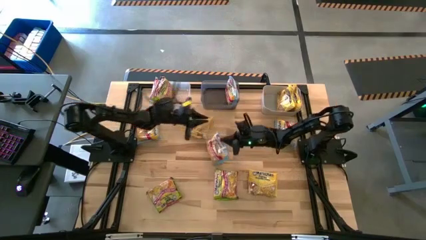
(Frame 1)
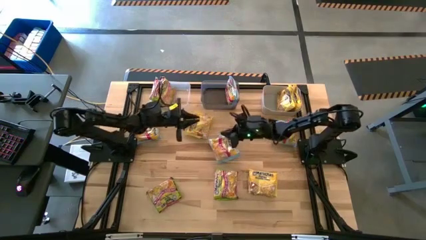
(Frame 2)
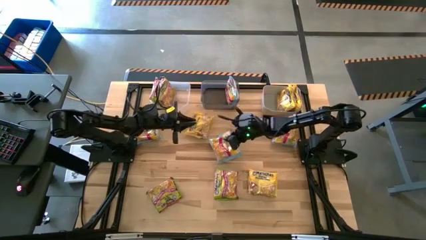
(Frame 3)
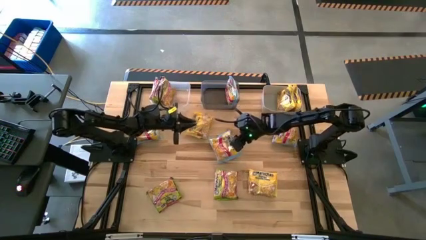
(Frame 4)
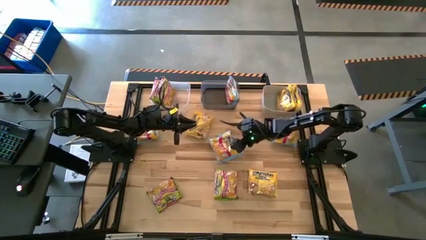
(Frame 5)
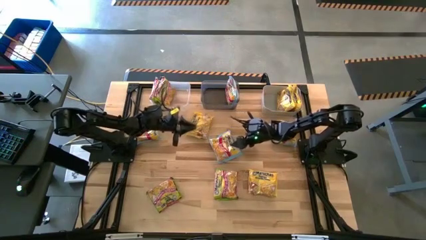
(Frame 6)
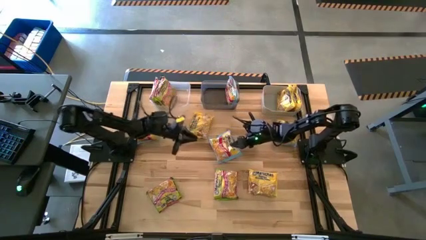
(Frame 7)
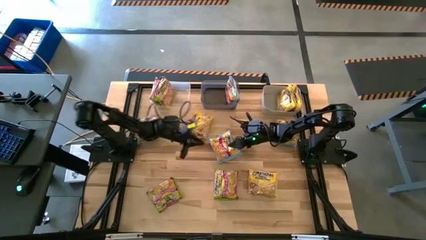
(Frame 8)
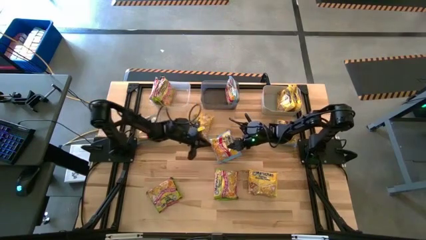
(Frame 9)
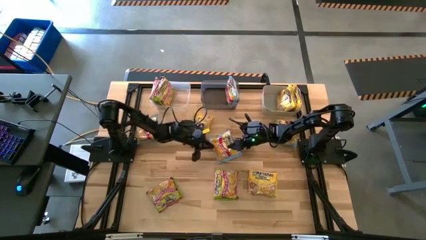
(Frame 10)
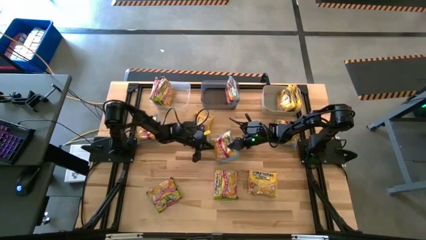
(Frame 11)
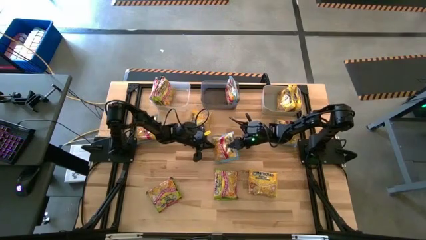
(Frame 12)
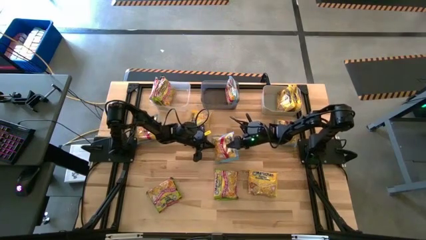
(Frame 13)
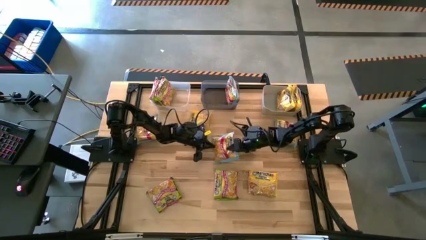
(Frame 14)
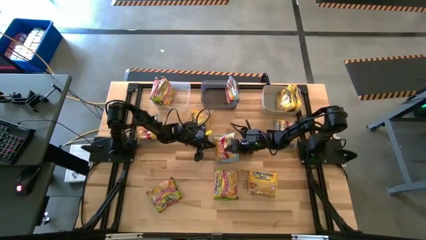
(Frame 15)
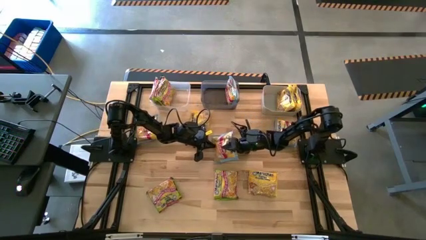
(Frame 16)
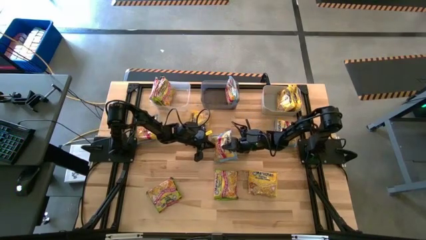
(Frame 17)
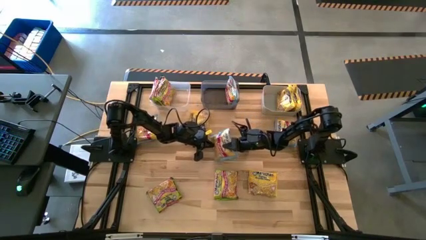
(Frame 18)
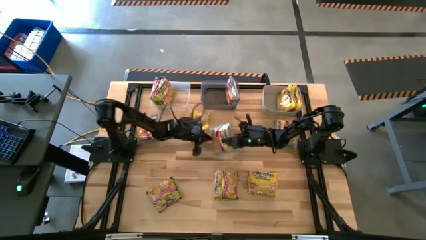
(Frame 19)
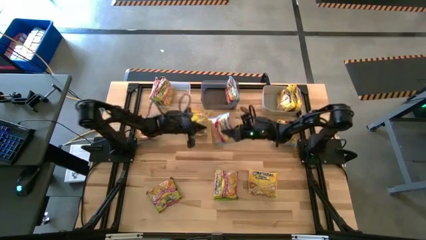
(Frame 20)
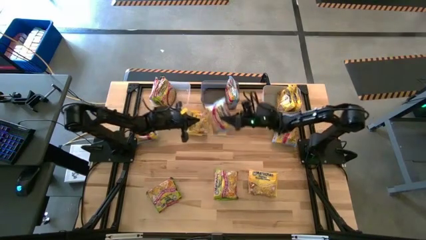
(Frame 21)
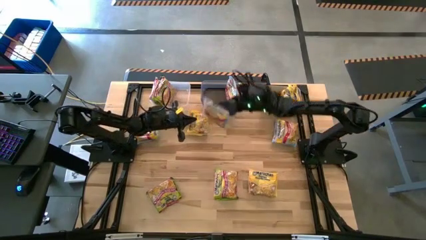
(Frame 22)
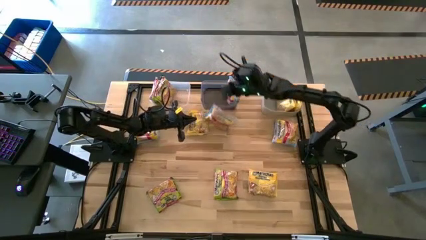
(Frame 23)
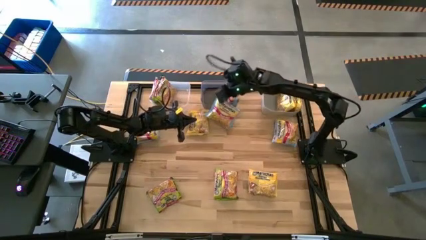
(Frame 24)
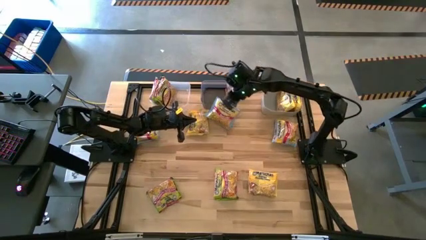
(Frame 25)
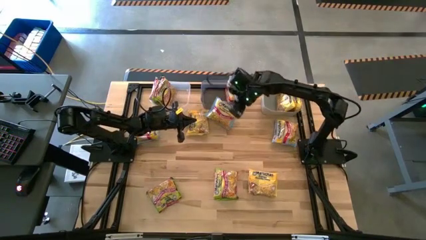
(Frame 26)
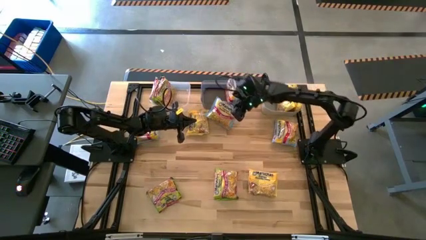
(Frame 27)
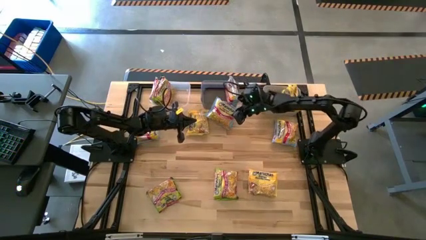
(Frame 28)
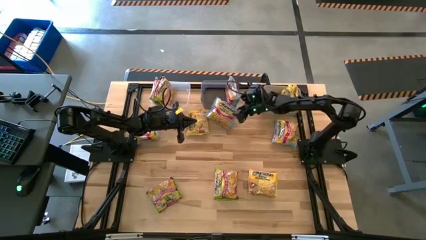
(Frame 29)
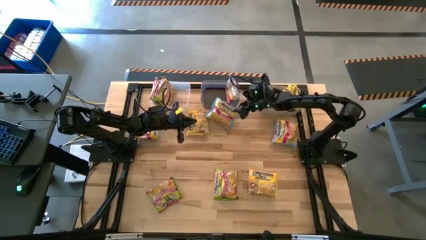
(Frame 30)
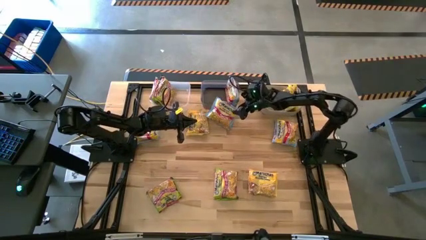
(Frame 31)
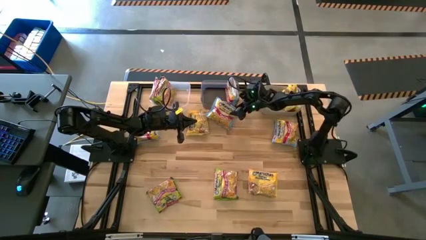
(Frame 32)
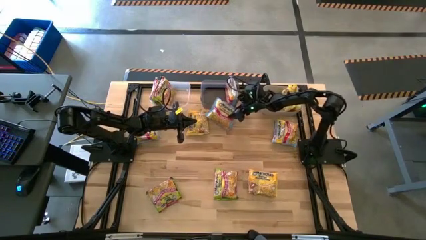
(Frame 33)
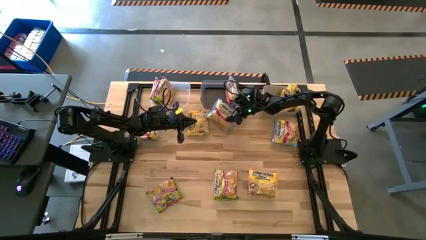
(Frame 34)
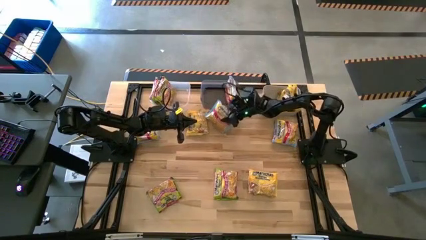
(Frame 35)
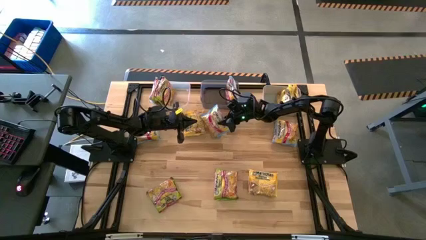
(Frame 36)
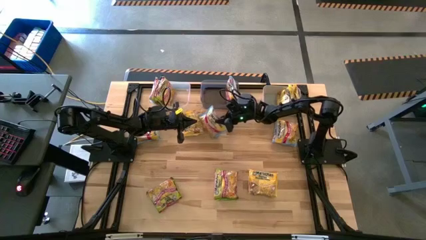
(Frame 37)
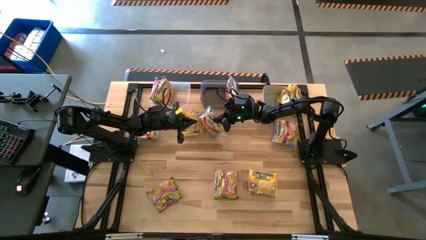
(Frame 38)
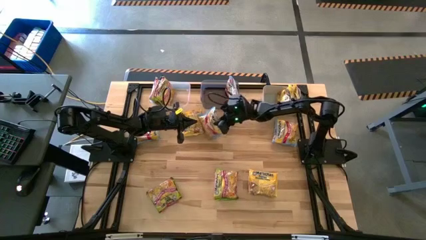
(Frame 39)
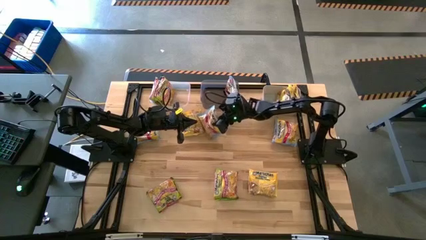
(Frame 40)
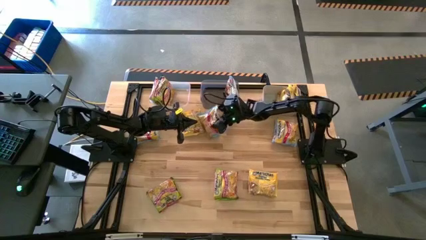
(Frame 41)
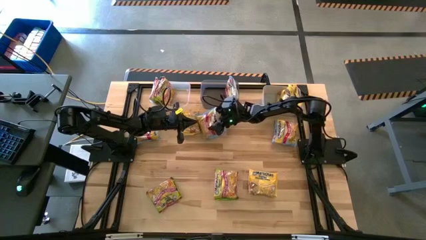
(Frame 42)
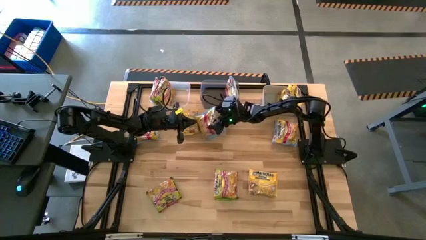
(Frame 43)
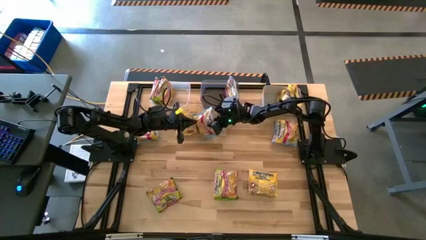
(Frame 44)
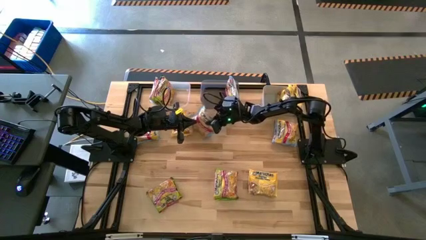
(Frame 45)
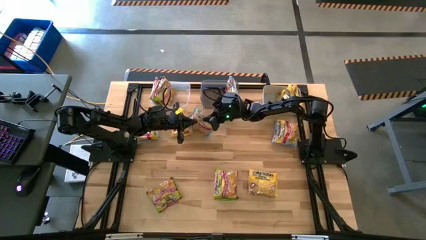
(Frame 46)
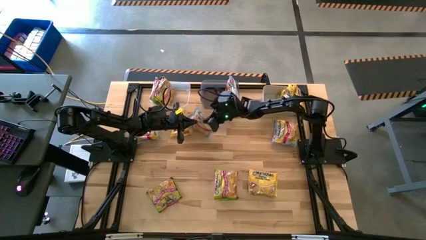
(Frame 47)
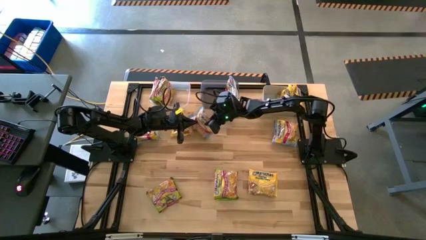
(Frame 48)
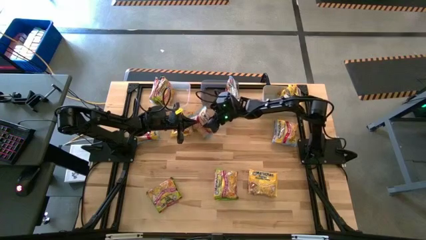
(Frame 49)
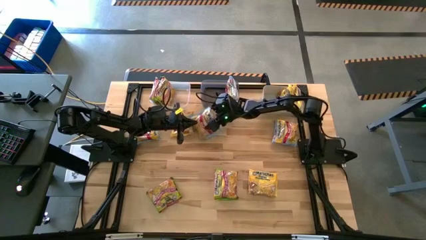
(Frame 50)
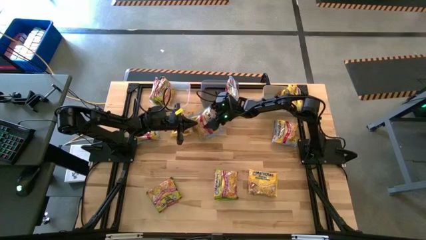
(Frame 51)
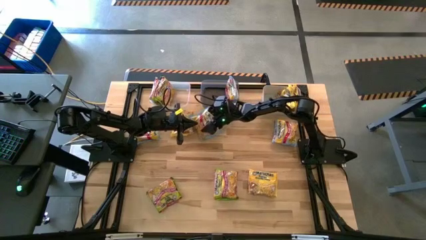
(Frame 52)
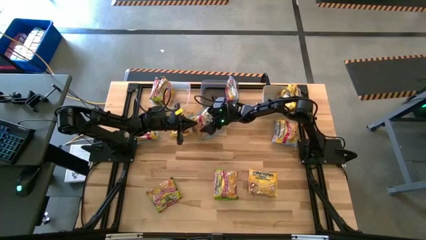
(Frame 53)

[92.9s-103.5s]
Task: Sort Maruchan noodles
Put the bottom right blue noodle pack into the black bin

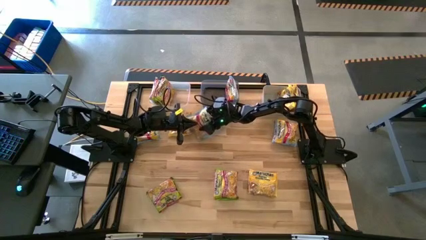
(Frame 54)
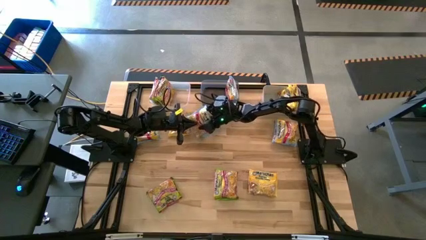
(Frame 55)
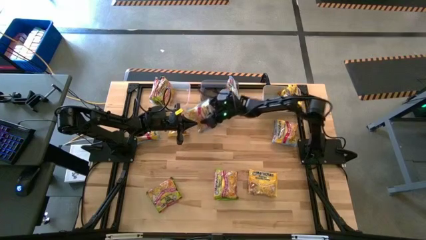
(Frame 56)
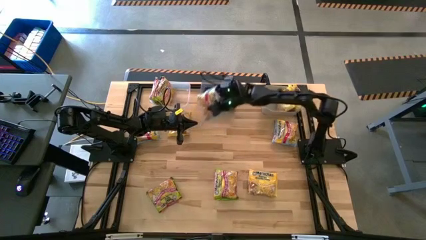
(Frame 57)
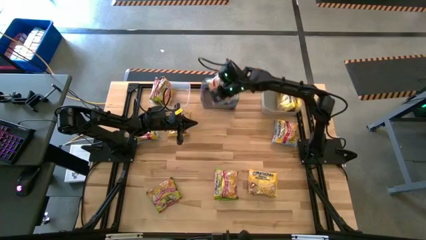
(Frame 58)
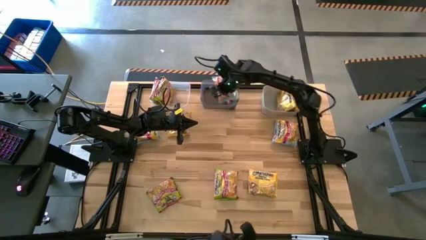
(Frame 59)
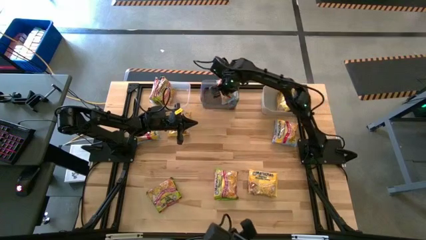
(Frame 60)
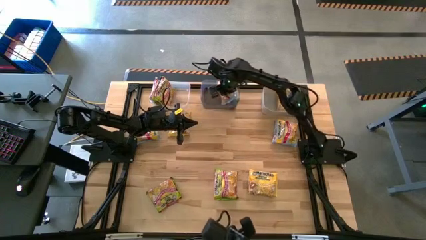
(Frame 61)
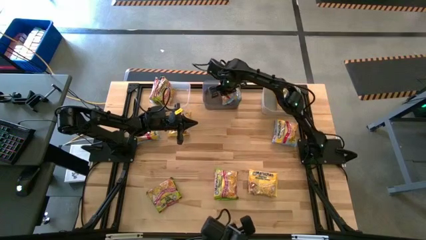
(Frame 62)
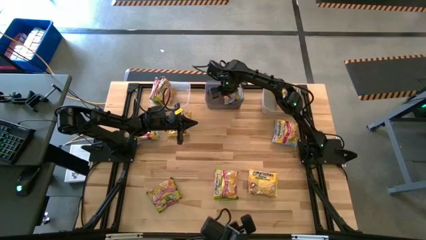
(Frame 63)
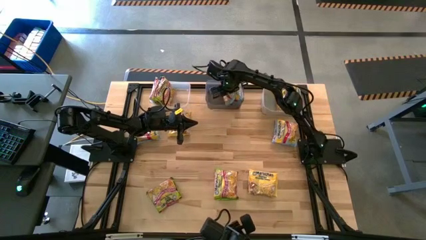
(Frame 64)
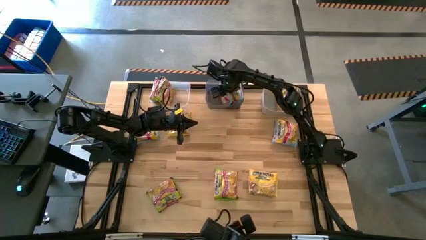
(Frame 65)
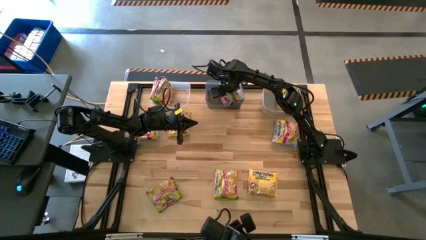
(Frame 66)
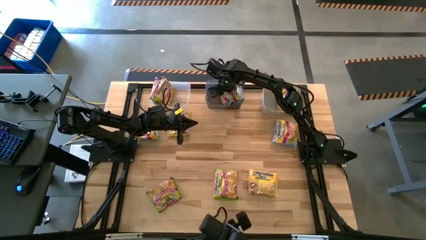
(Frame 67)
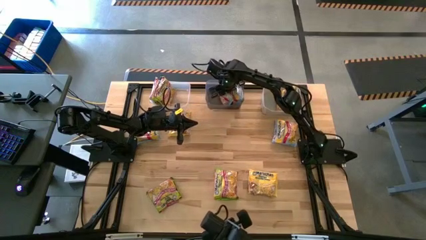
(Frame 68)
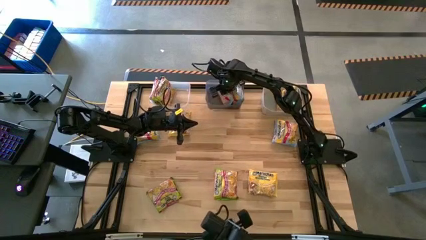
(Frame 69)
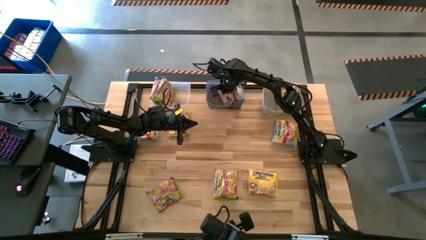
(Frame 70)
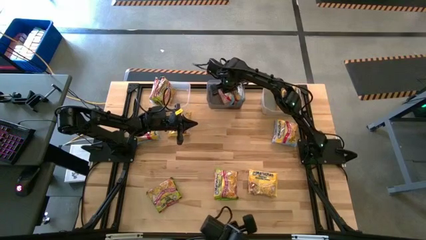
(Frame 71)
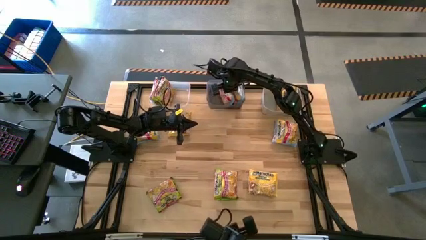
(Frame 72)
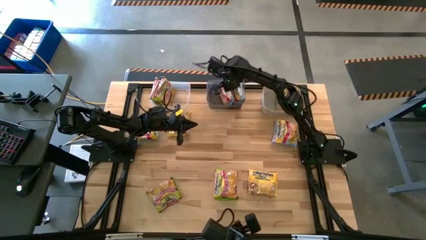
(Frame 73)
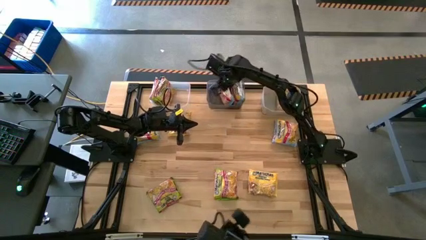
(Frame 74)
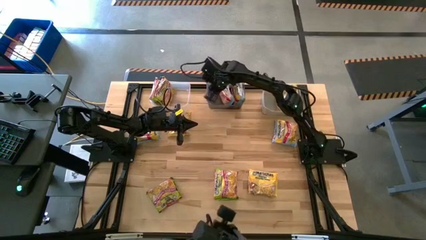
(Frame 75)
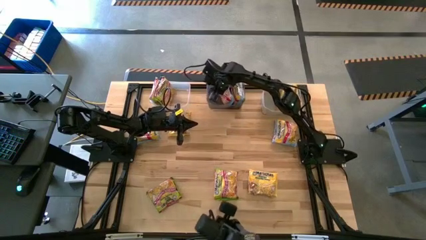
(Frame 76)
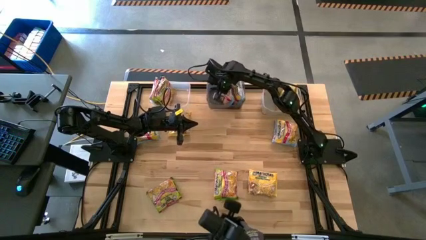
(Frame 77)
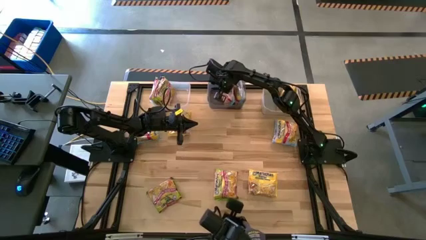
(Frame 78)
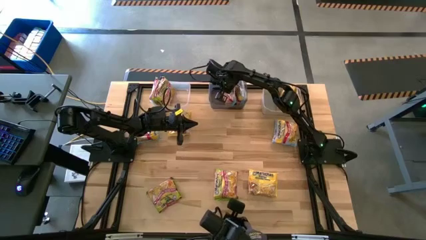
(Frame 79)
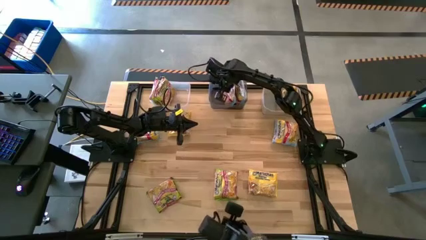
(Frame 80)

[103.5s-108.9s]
Put the bottom right blue noodle pack into the black bin
